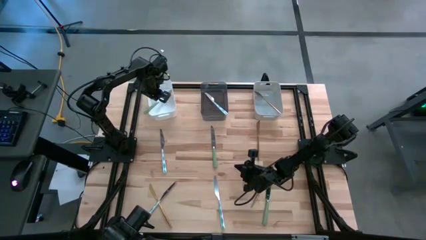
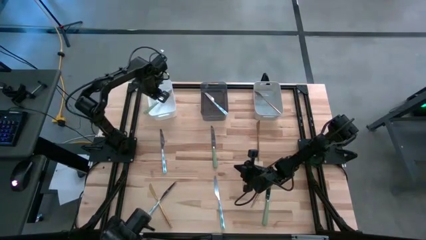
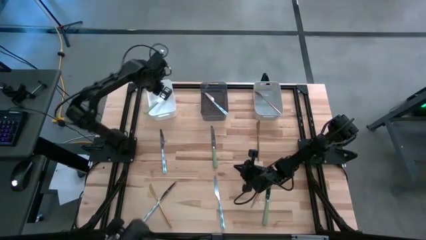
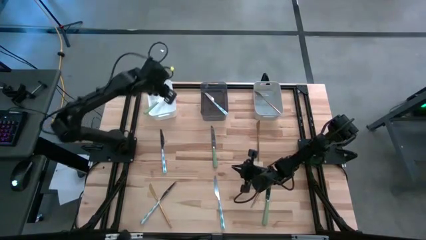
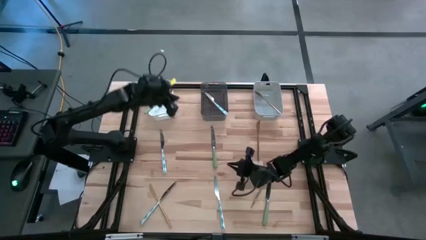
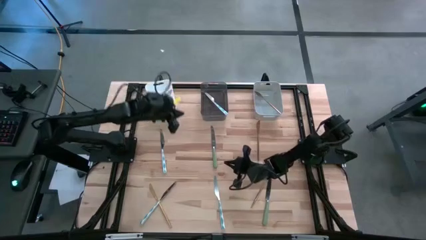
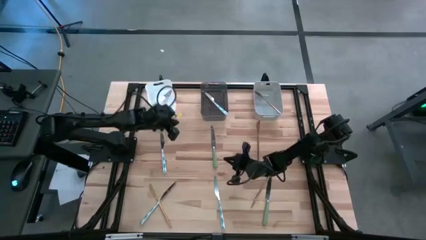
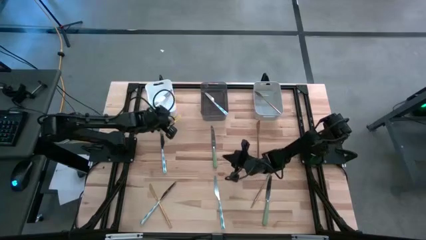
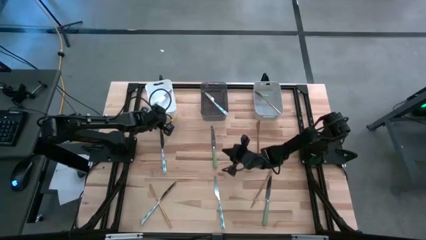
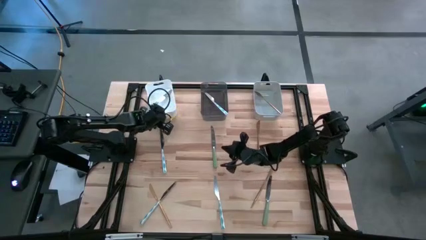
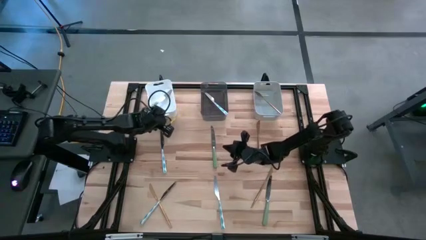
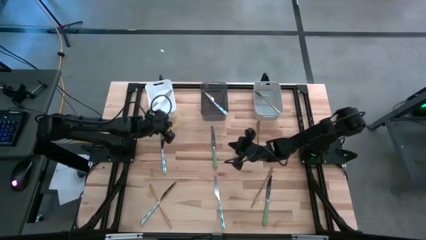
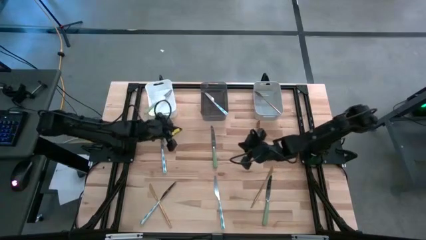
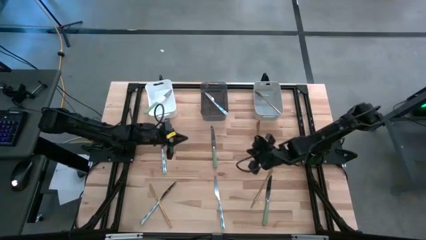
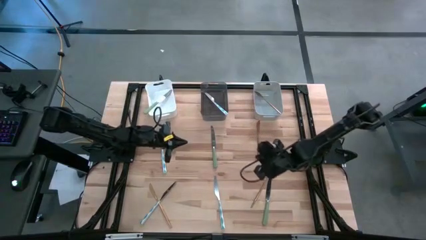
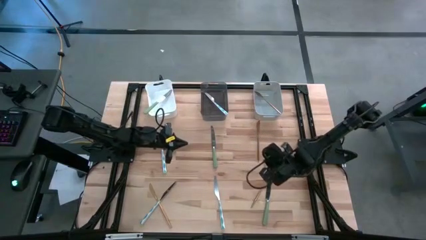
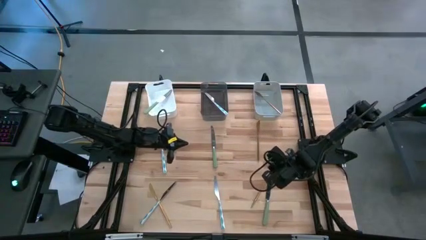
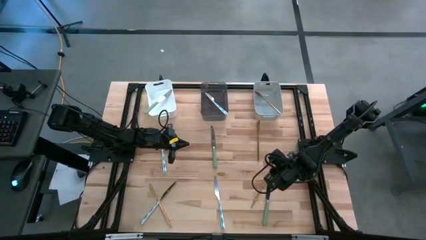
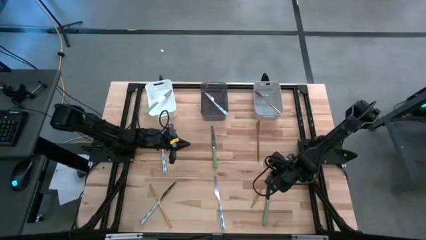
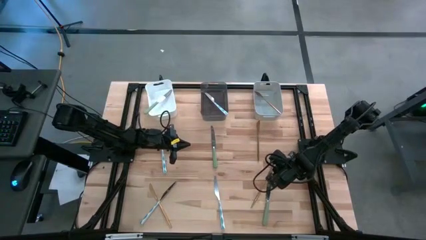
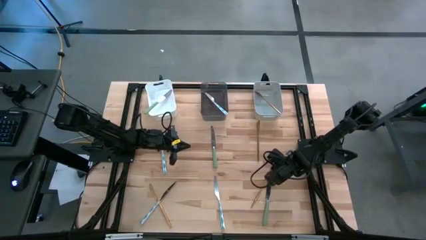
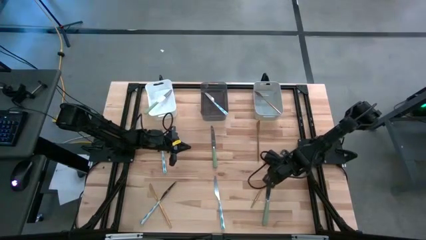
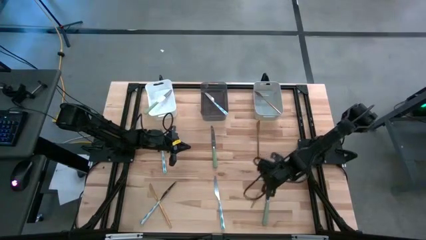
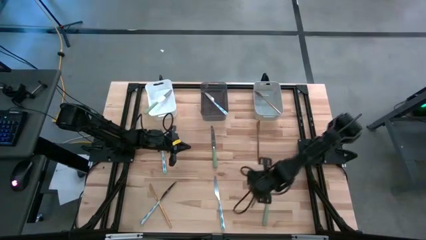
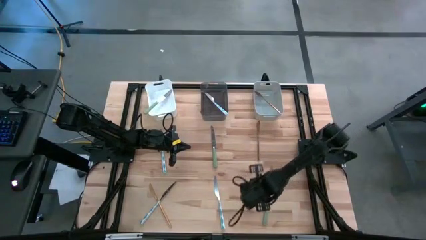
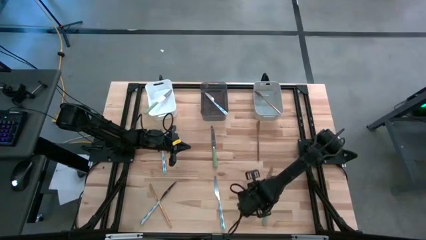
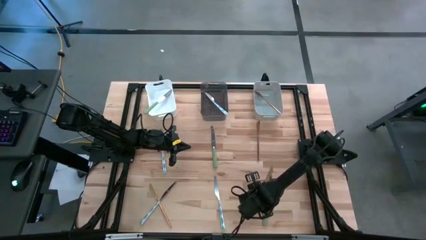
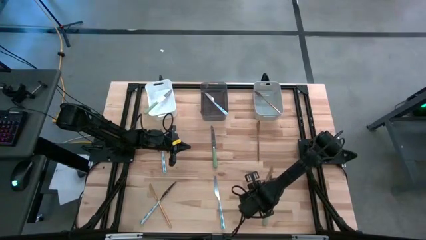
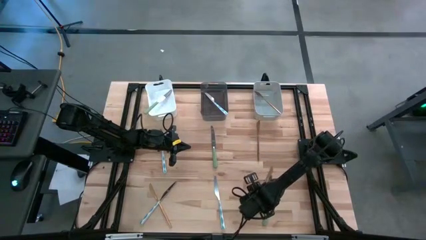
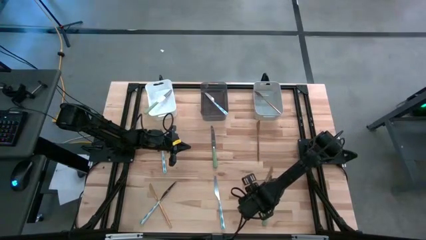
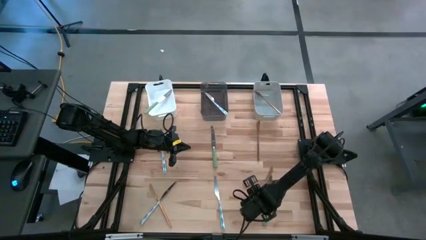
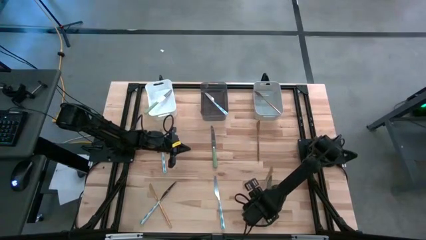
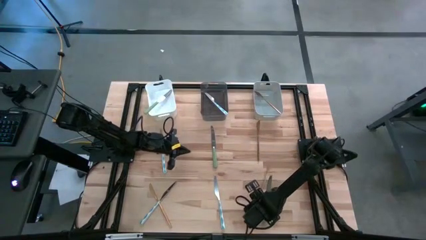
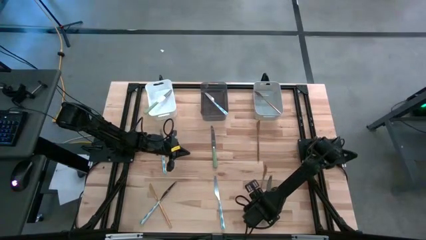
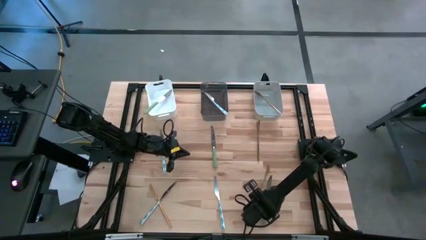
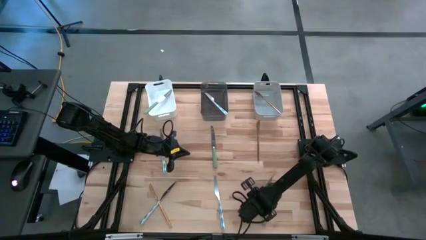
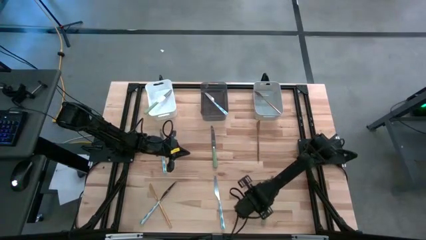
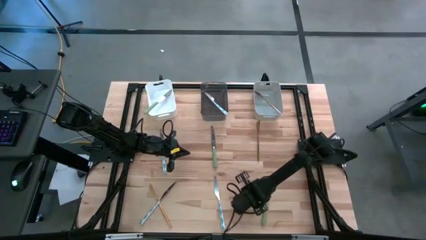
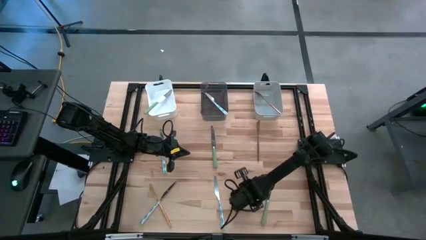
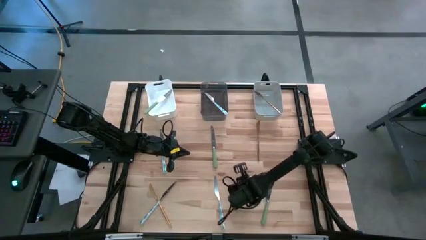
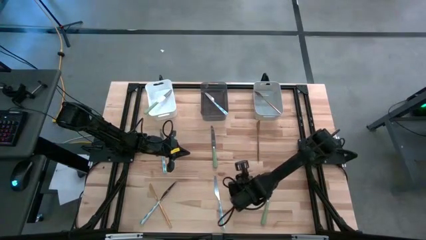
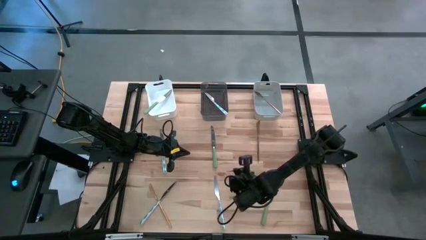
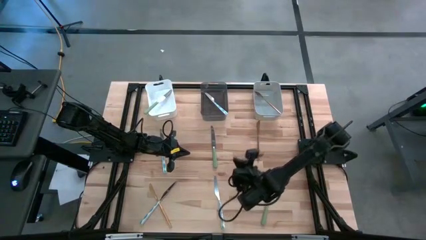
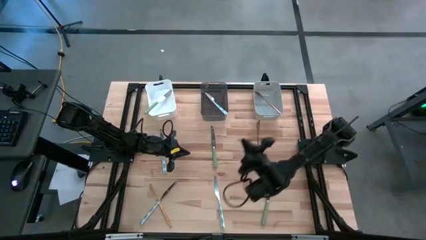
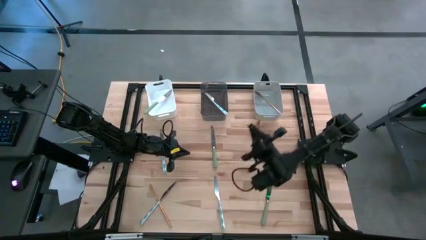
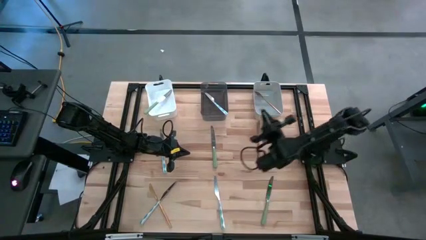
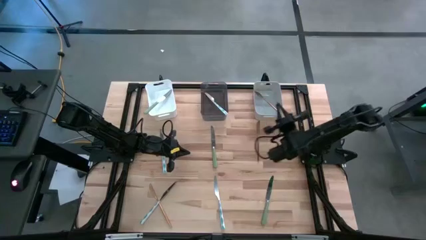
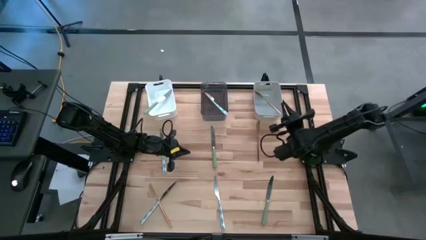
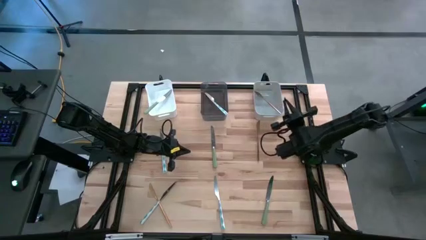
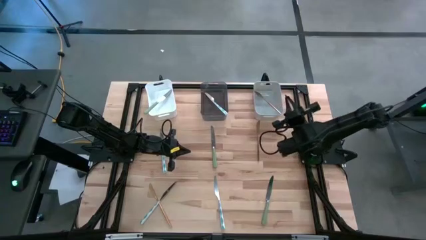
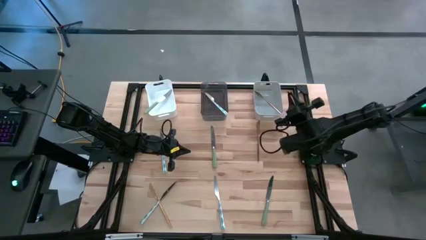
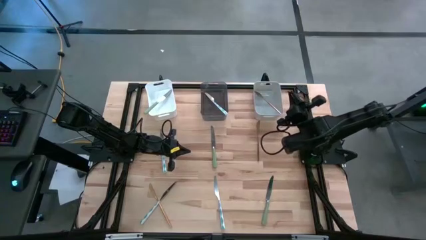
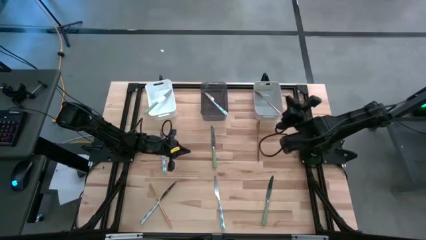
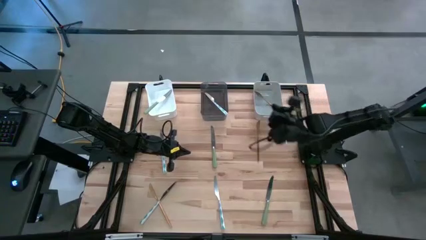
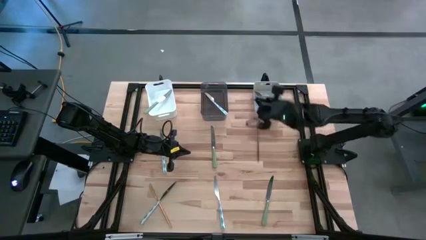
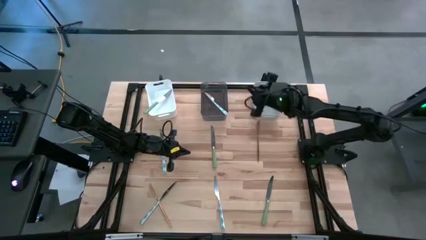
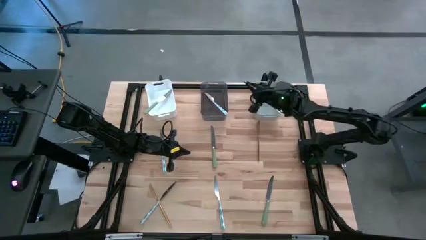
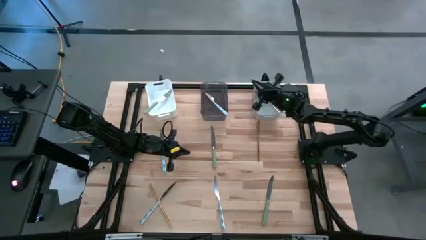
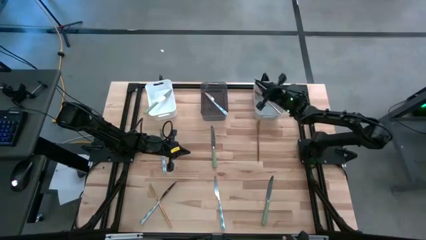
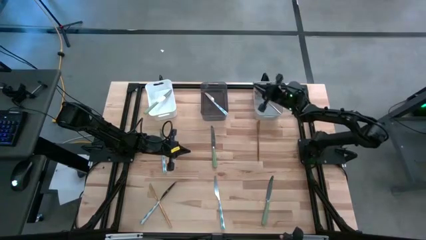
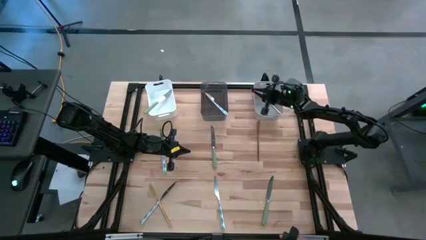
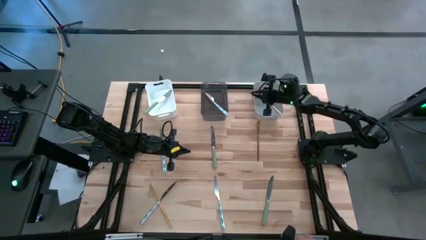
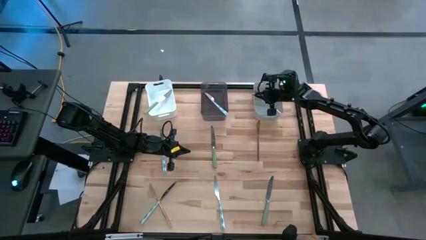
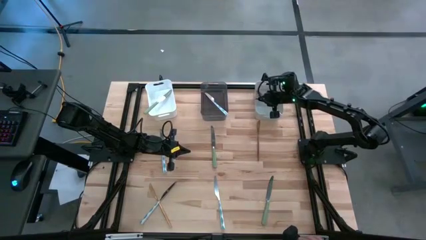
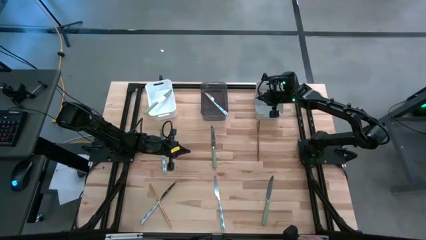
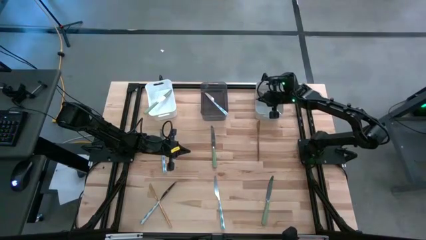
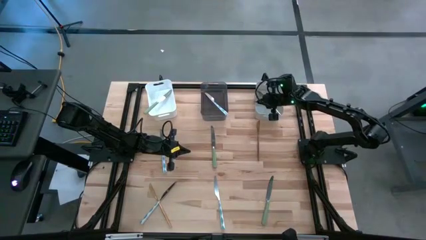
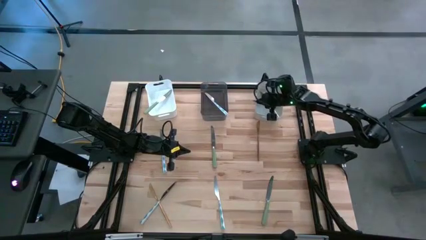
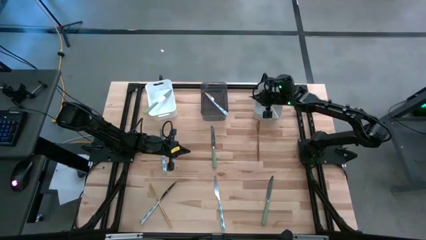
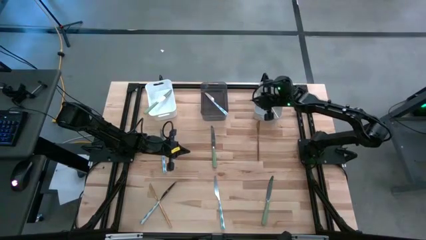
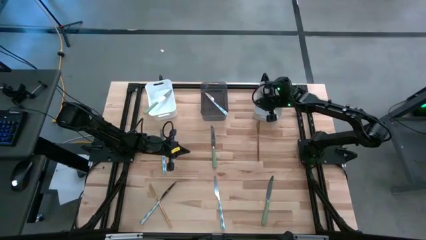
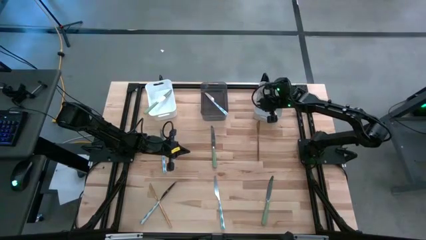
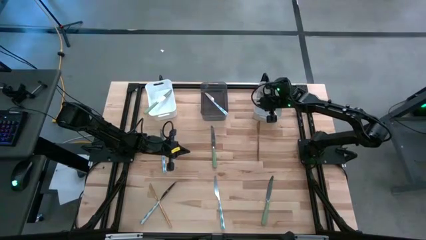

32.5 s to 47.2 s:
Task: Sort silverware by color (type)
Put the bottom right yellow table knife into the gray bin
